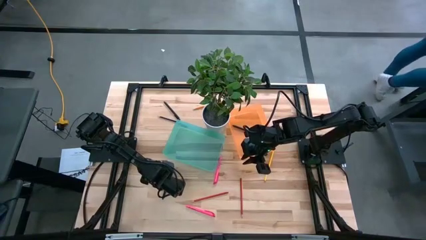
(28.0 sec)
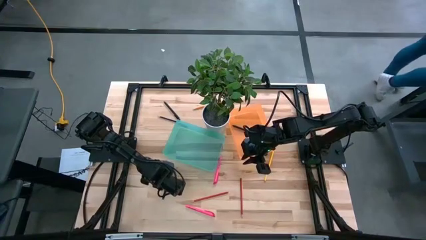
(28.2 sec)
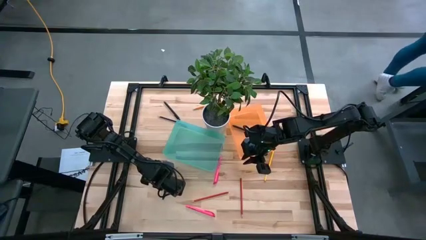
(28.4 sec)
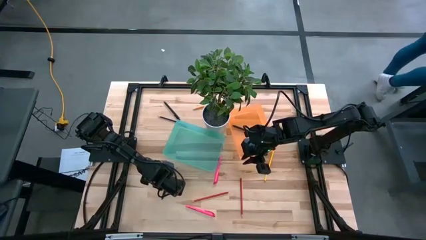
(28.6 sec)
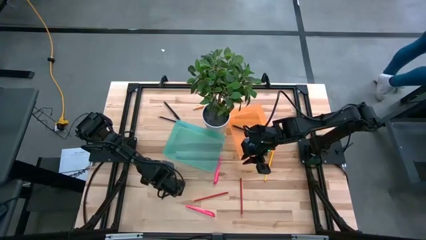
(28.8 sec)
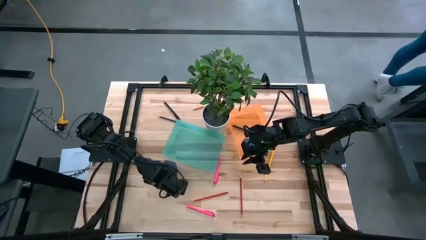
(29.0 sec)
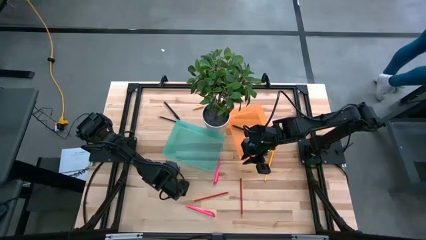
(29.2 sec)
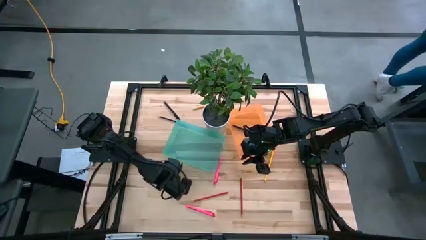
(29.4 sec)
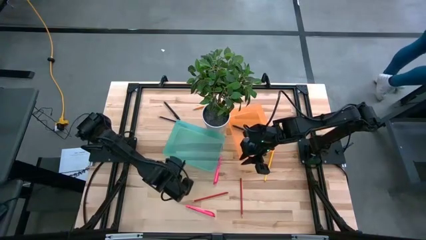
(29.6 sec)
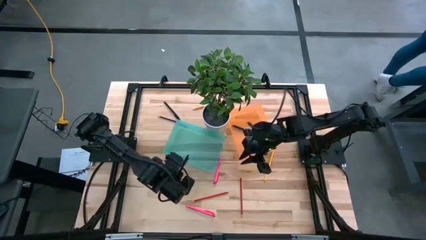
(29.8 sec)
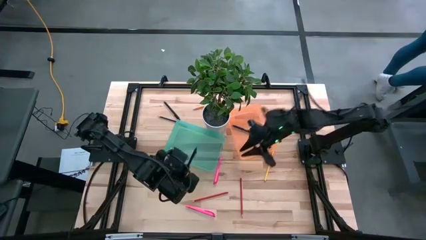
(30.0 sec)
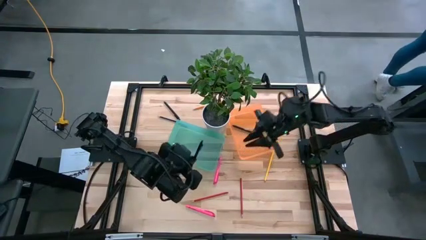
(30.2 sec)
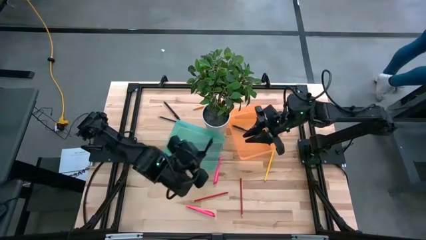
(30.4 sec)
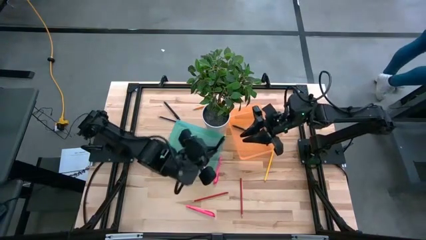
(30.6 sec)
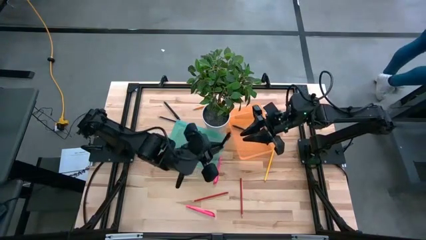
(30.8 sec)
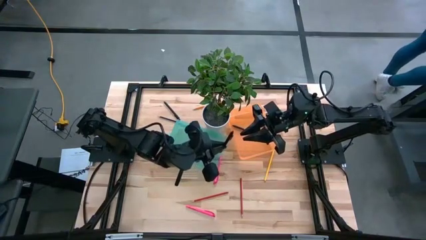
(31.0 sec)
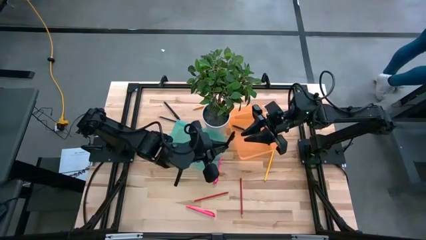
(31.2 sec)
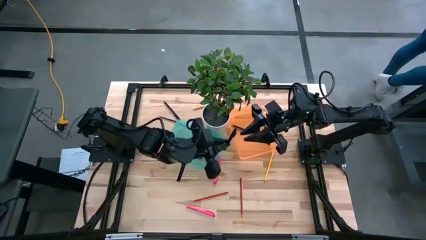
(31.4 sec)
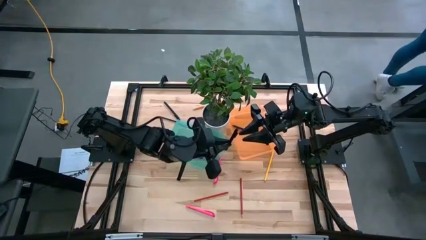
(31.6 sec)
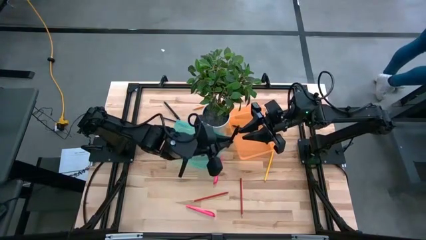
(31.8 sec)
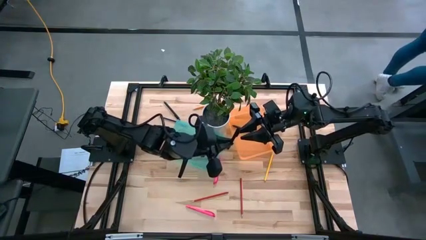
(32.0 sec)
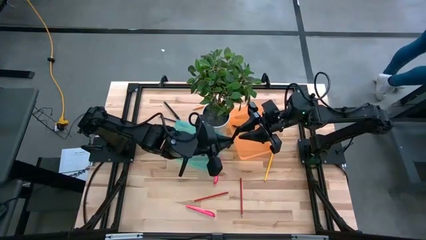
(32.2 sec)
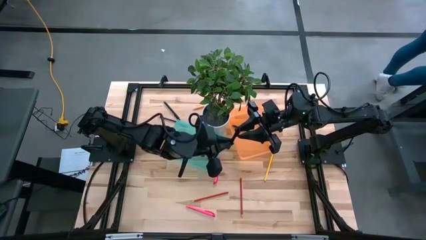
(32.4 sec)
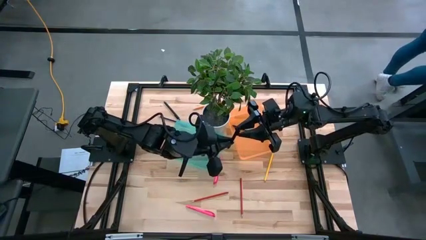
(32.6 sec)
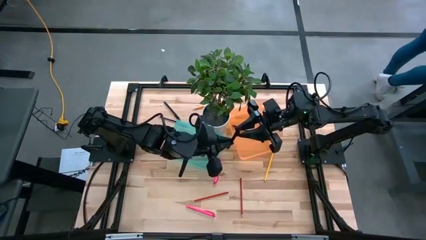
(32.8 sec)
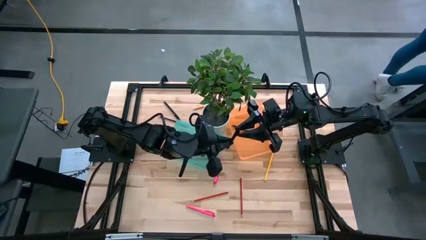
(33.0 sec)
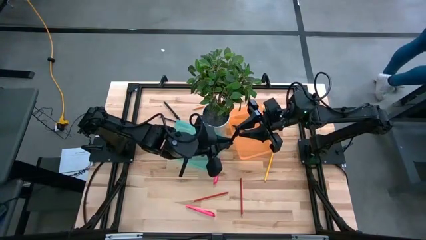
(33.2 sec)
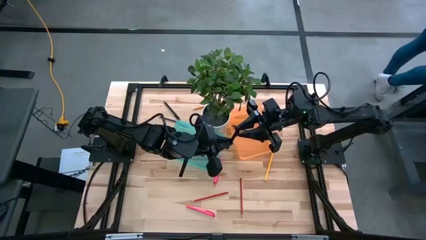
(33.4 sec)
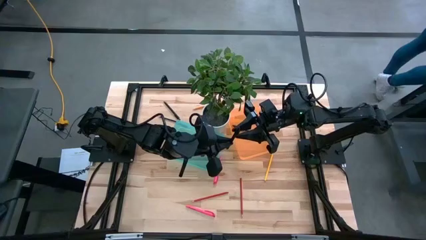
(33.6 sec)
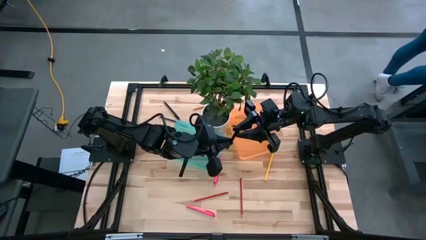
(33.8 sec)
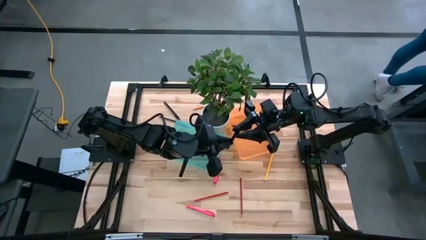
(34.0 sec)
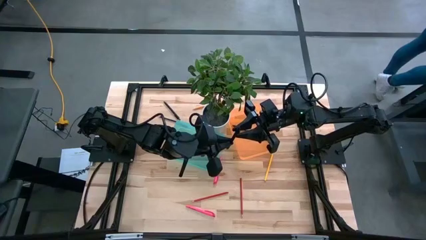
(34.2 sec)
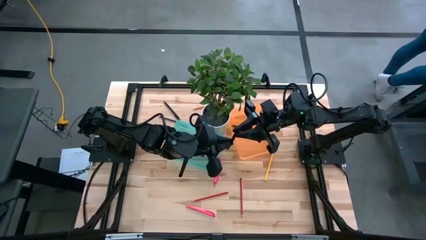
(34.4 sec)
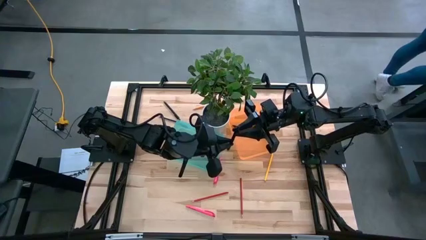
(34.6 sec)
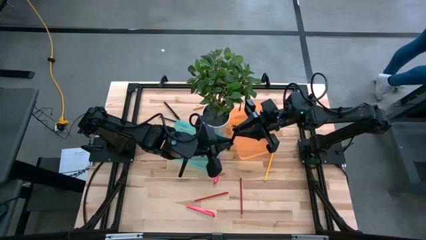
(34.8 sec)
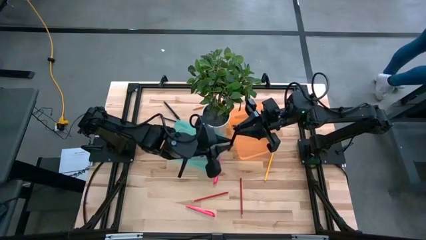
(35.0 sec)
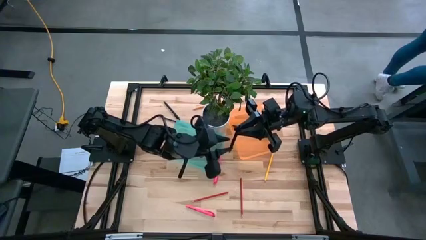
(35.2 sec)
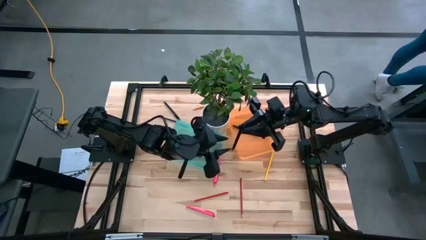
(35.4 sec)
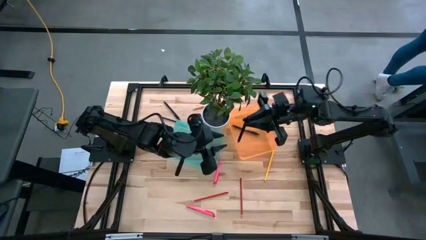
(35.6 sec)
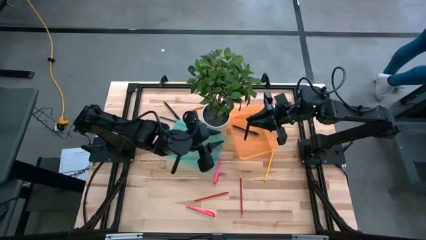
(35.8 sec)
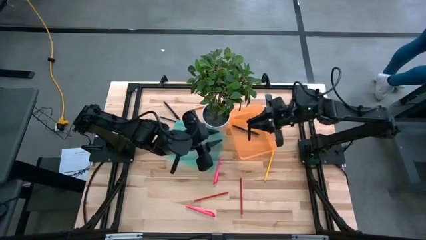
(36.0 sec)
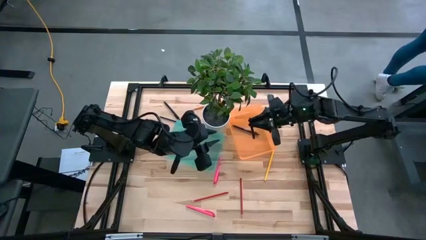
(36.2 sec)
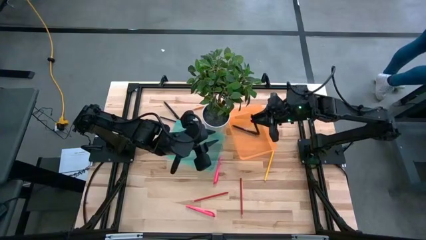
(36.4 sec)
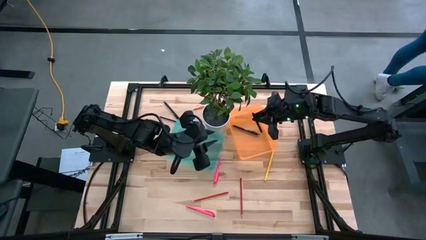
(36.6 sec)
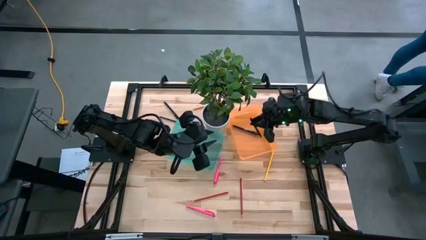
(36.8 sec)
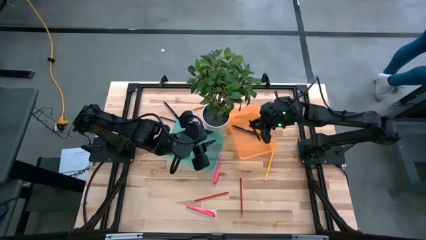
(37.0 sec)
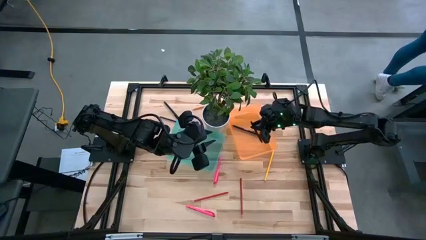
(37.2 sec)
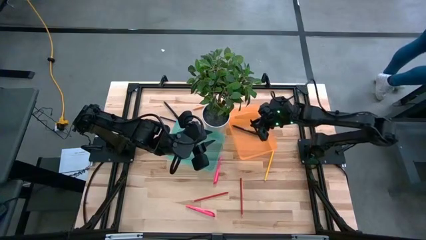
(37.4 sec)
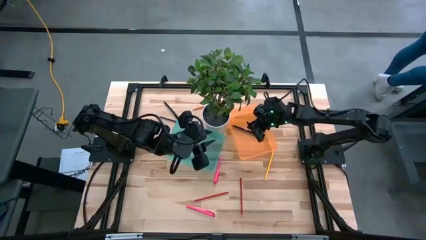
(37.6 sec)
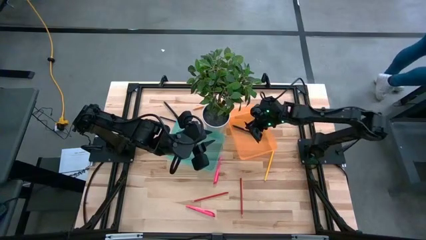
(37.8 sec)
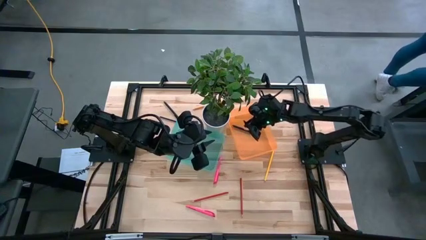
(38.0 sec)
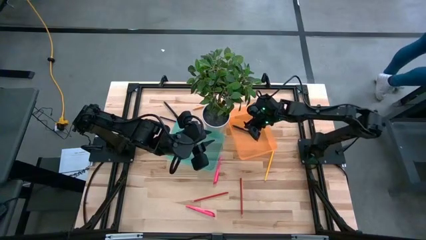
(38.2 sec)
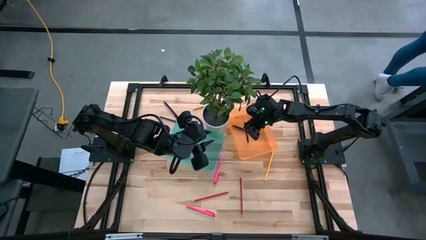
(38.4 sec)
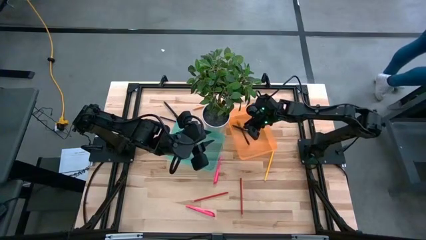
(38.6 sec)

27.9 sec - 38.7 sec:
Task: Sort pens & pencils
Put the bottom black pen into the orange bin
